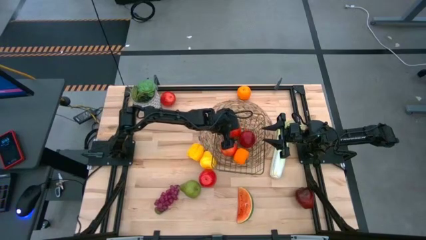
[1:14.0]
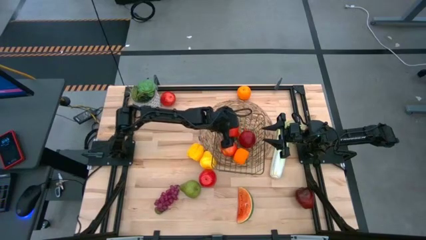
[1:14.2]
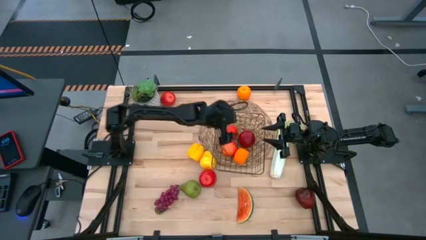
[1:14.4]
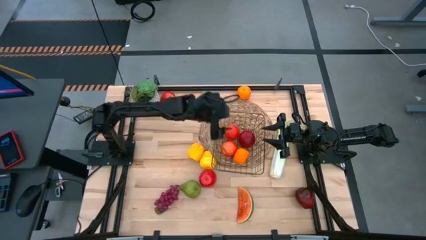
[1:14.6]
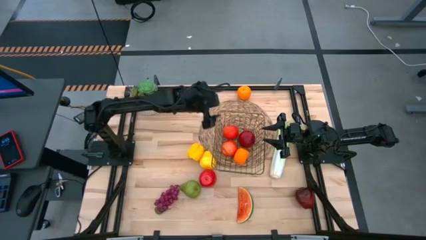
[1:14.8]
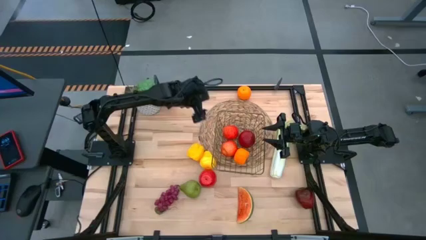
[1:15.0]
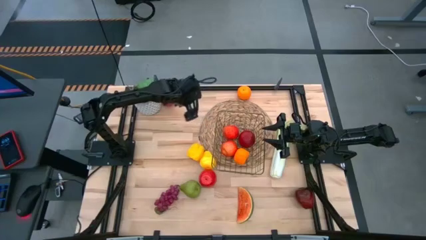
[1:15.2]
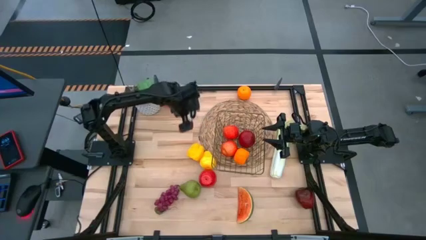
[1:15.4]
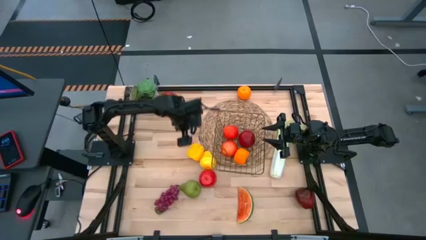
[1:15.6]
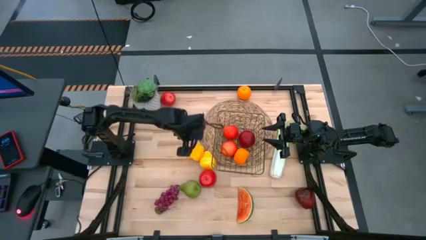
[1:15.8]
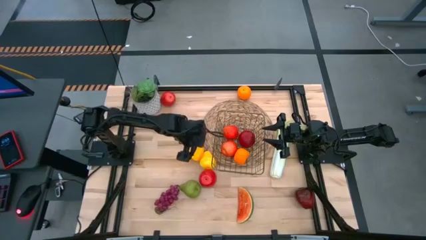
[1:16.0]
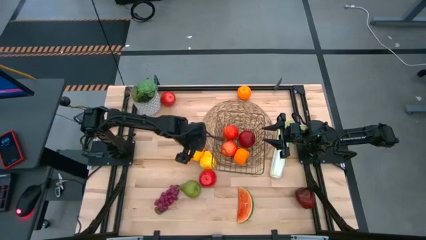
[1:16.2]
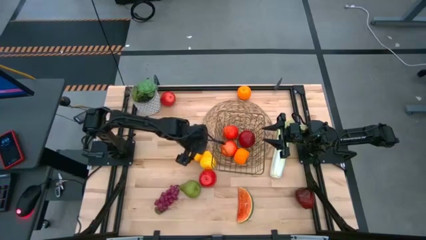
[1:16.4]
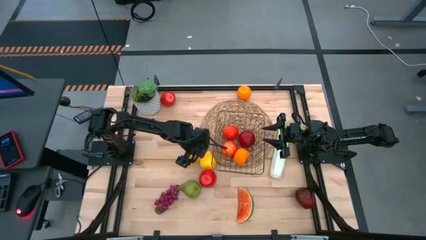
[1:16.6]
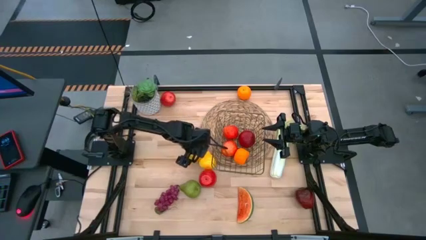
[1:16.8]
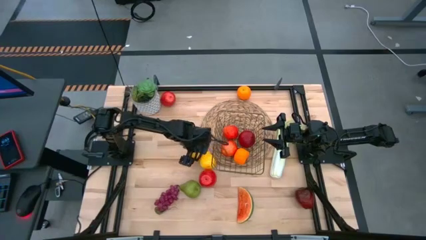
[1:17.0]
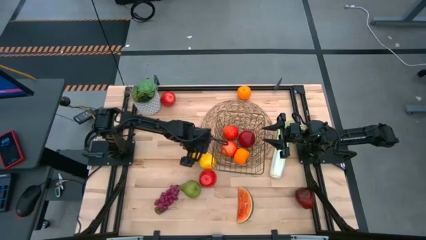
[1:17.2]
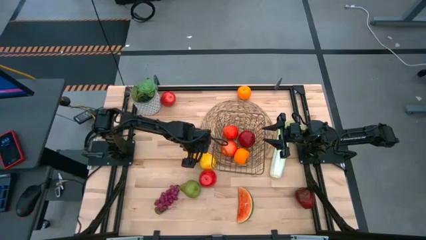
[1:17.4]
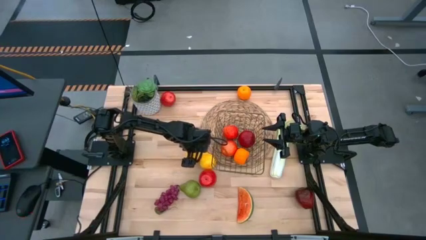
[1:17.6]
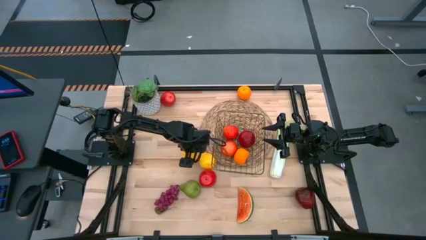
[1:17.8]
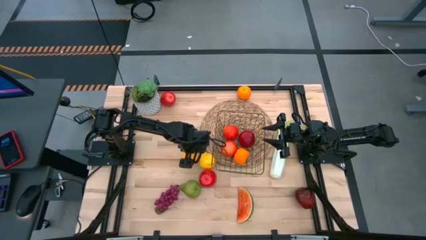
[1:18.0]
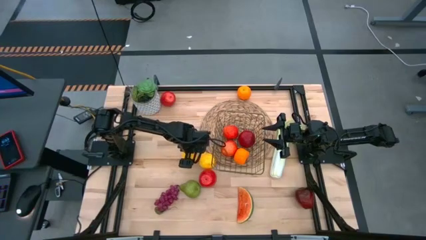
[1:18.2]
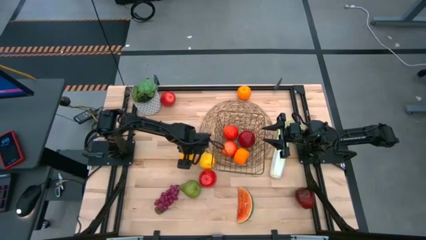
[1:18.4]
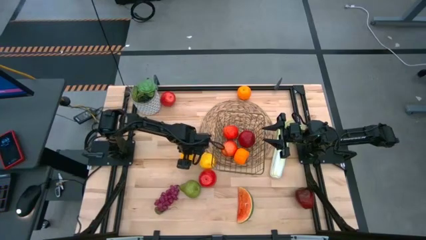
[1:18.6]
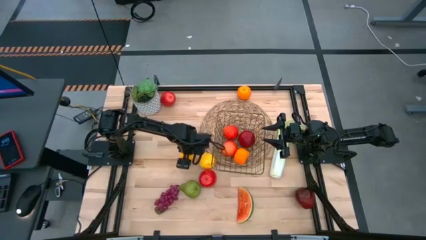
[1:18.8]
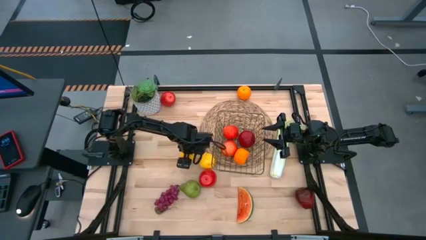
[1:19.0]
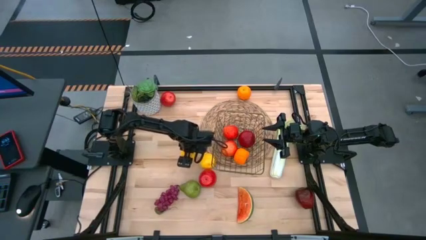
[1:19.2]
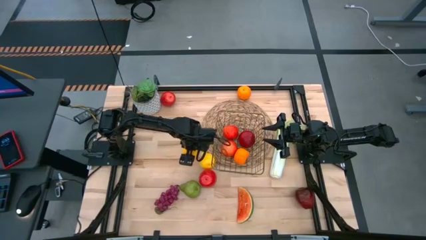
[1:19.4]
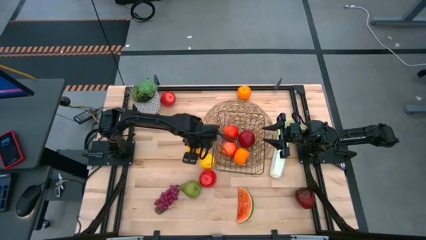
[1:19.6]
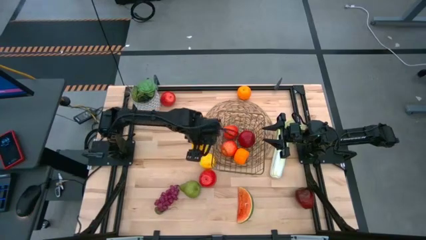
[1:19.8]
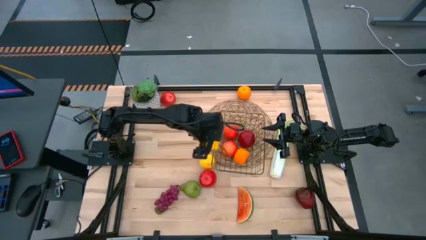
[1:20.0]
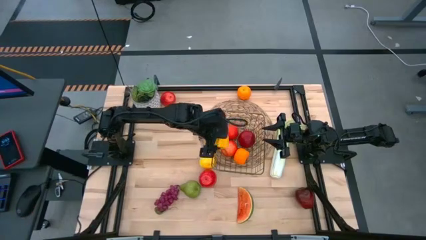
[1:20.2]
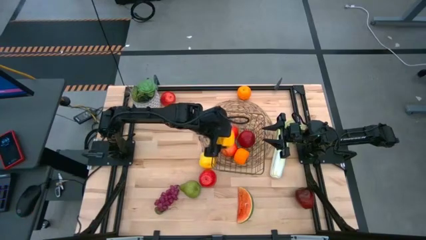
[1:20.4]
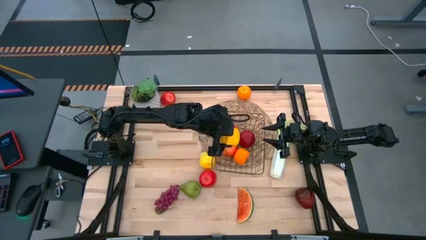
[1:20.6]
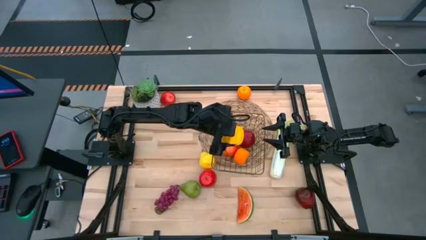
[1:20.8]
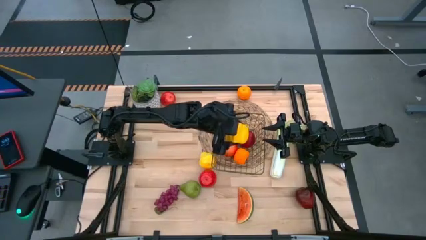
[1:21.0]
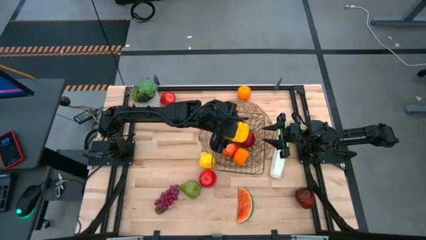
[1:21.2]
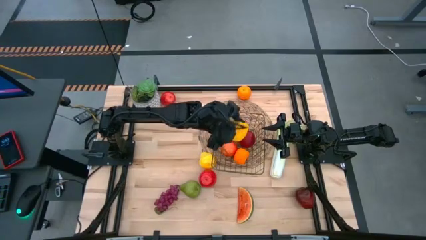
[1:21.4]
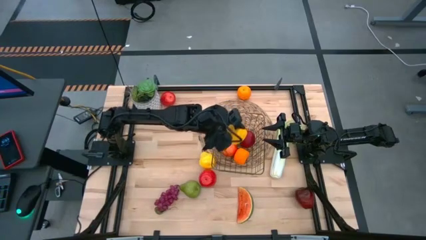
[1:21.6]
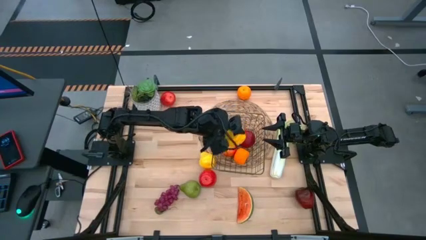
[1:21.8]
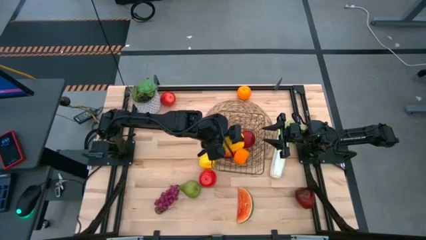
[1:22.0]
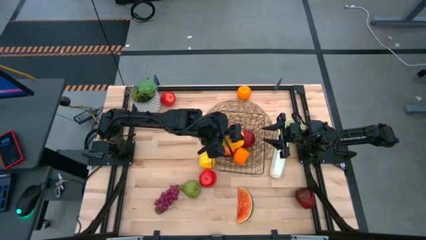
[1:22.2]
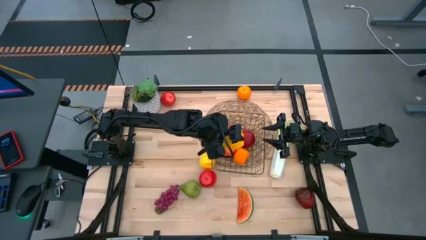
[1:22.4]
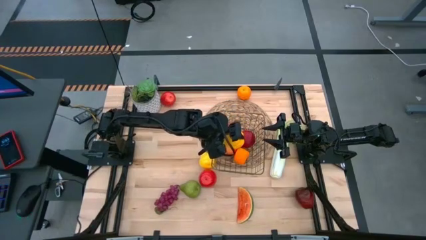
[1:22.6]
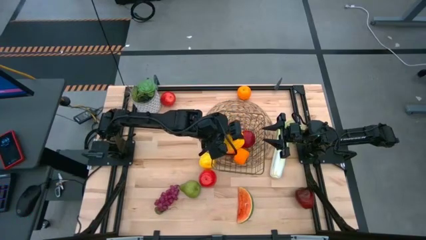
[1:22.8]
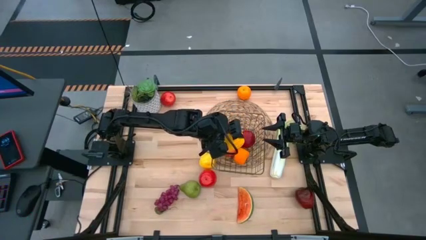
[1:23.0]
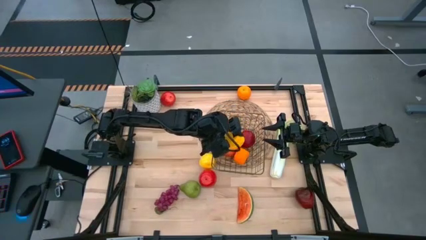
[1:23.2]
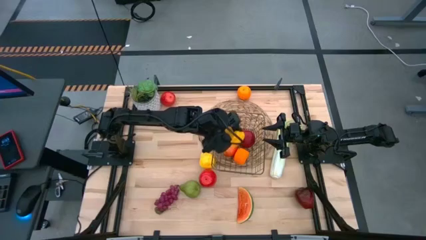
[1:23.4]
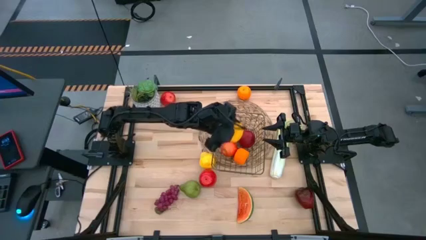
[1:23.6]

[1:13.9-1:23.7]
Task: Build produce basket
Put the yellow bell pepper into the wire basket

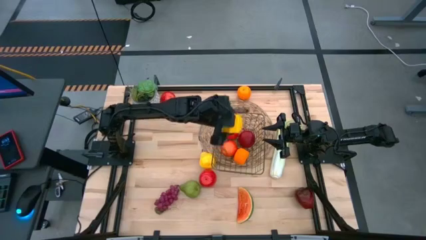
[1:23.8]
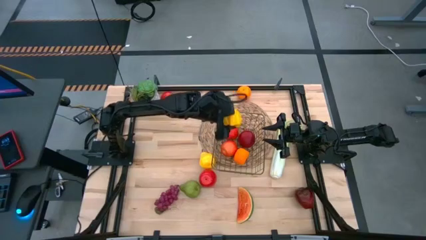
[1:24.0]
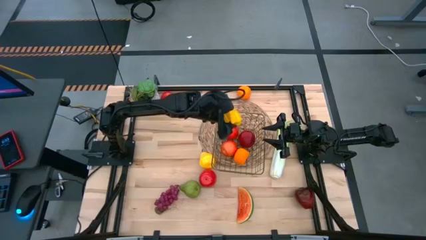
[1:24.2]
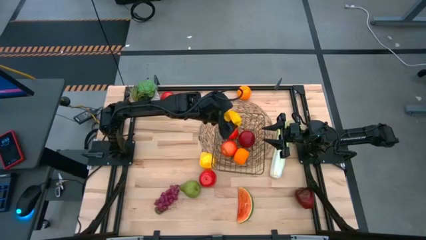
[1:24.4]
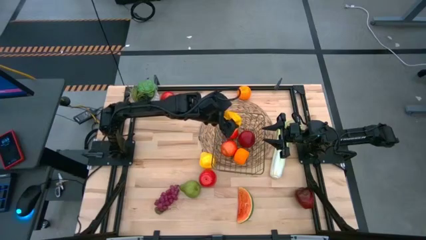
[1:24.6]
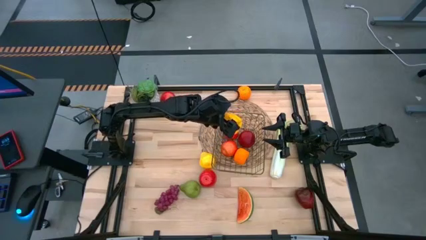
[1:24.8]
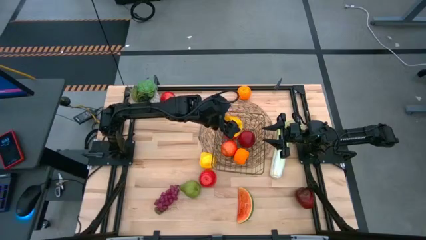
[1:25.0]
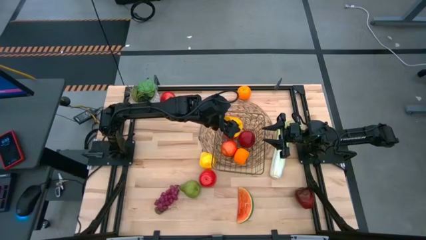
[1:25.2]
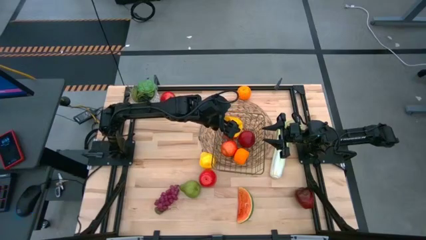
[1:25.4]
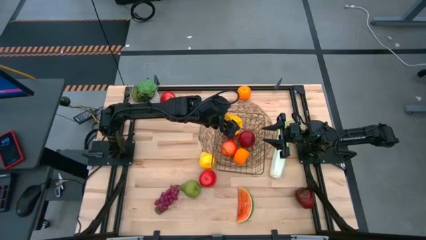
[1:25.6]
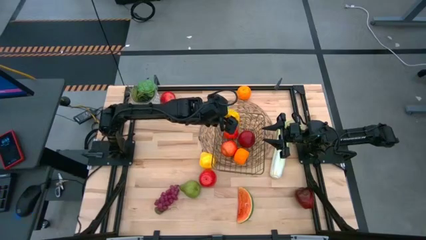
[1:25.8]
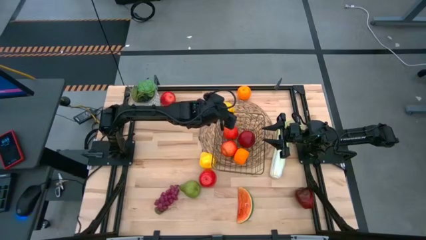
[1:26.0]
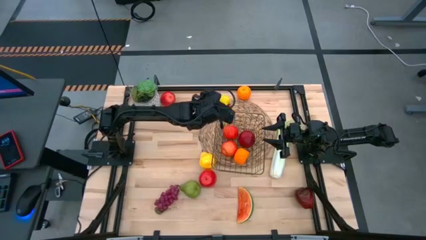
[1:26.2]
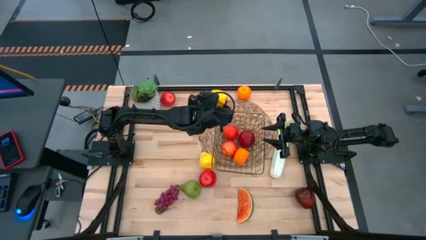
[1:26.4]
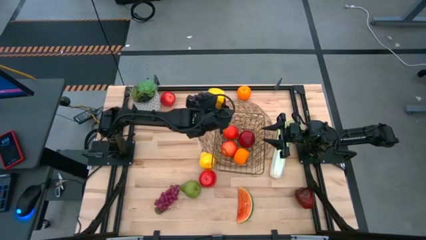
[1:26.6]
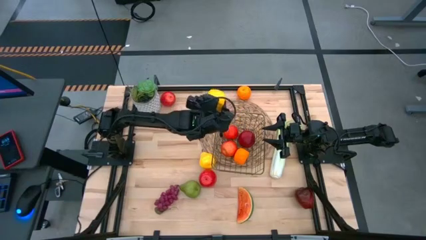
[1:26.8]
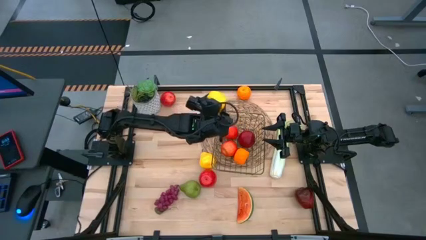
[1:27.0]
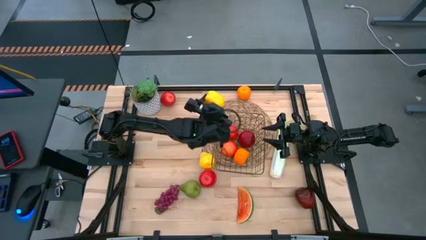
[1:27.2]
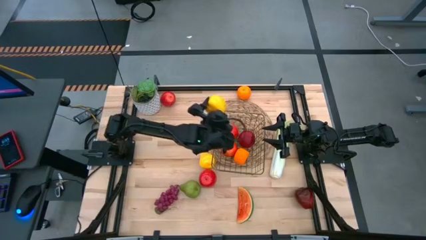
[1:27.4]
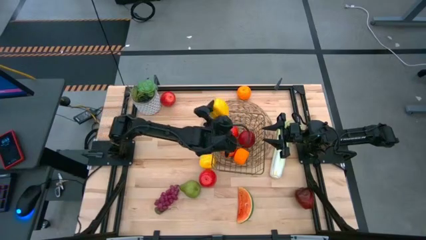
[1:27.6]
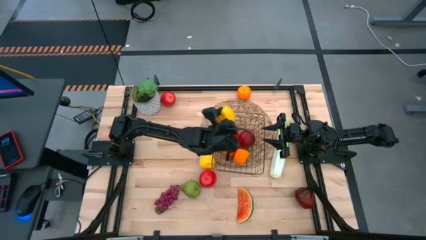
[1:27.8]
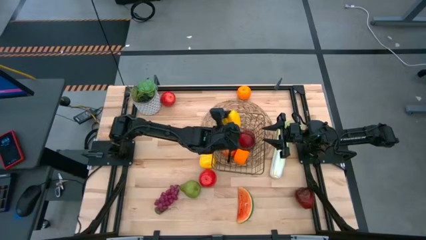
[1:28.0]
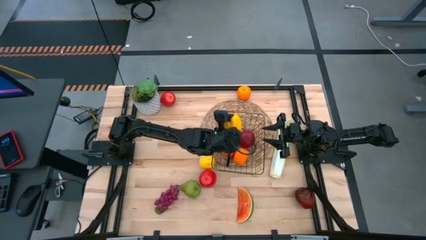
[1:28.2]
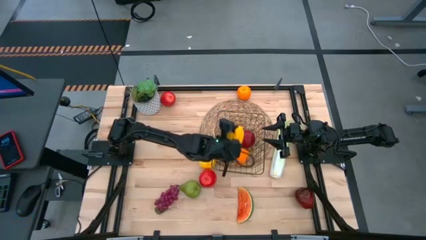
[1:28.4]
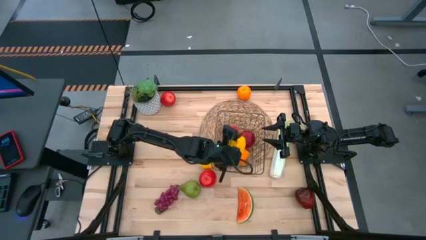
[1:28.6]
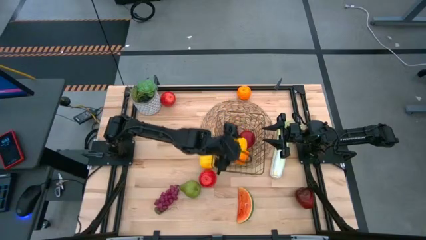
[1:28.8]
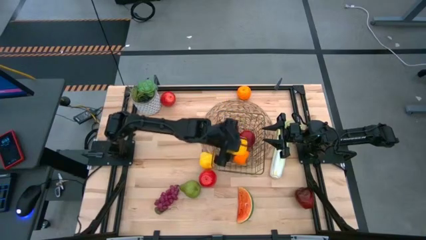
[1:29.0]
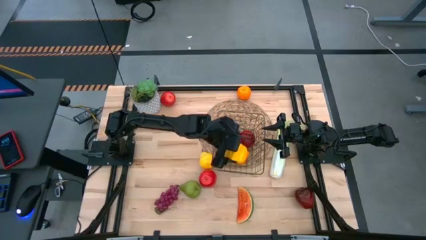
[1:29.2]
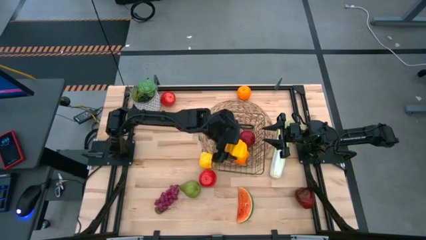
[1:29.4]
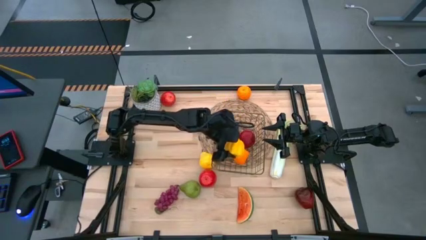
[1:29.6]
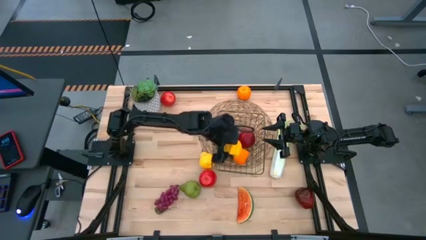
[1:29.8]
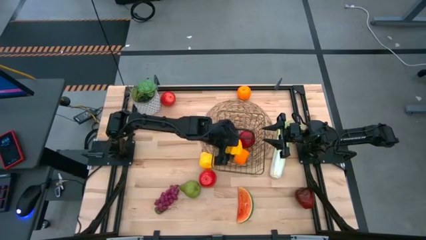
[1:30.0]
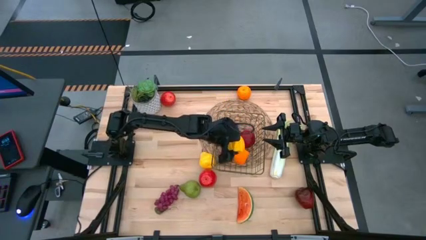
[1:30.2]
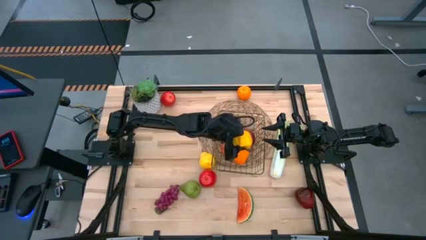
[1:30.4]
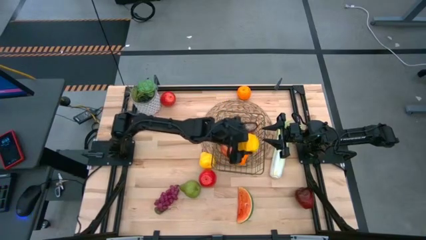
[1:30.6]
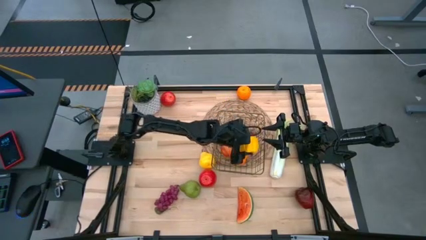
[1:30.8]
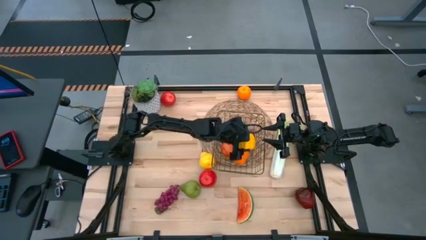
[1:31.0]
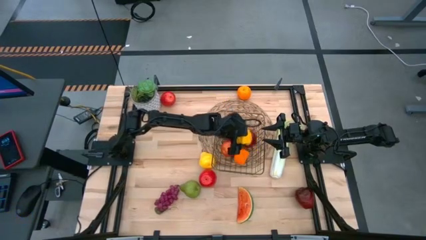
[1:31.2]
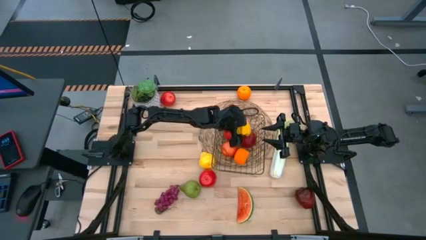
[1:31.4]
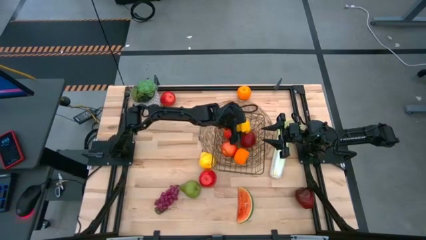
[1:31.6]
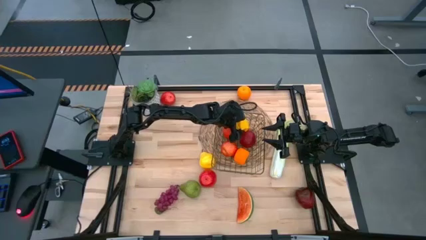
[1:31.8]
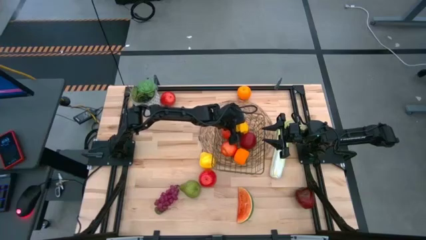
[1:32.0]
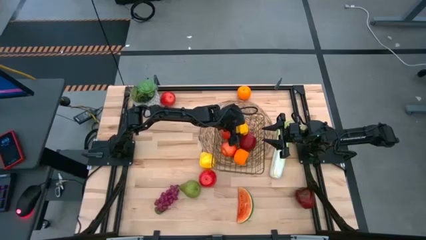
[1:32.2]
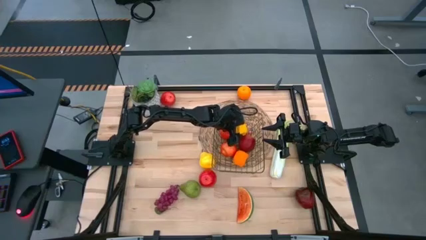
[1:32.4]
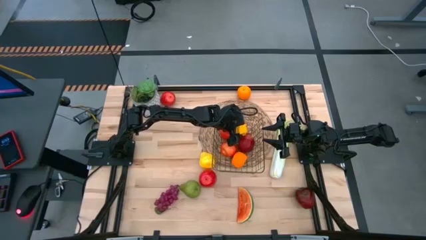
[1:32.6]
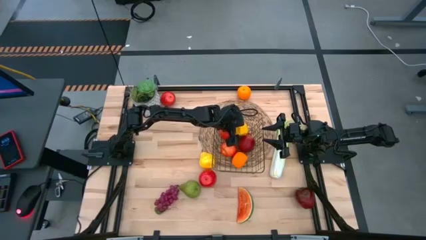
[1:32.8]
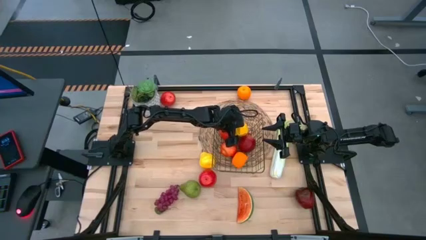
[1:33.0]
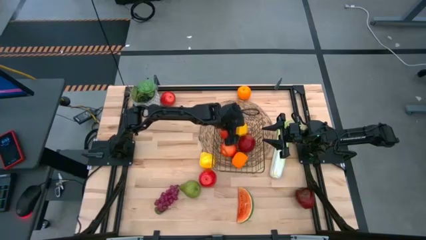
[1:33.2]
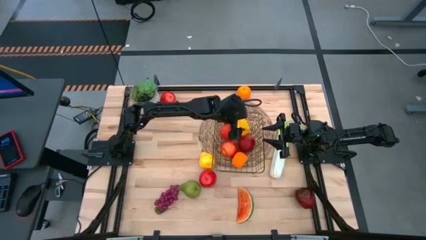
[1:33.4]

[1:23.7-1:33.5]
Put the yellow bell pepper into the wire basket
